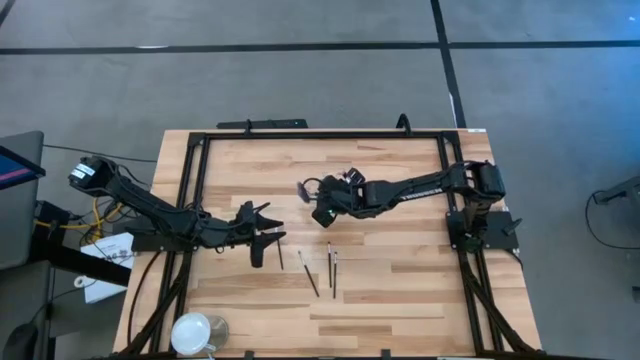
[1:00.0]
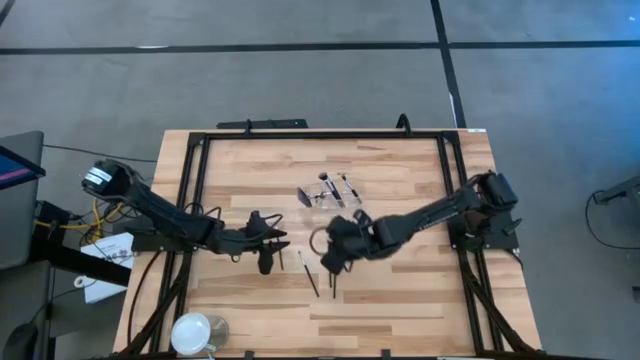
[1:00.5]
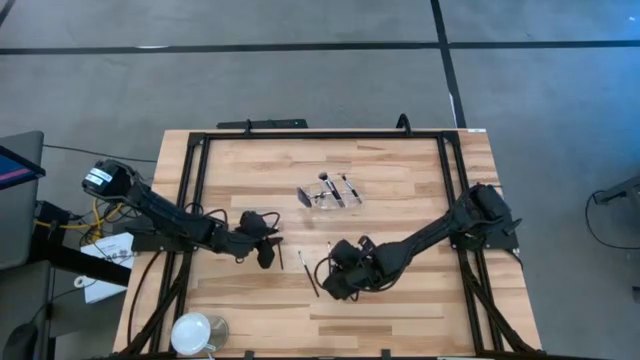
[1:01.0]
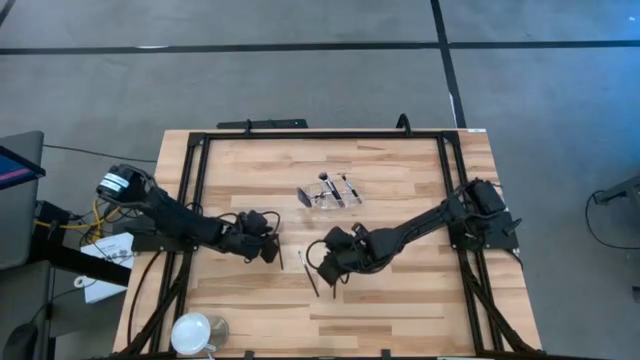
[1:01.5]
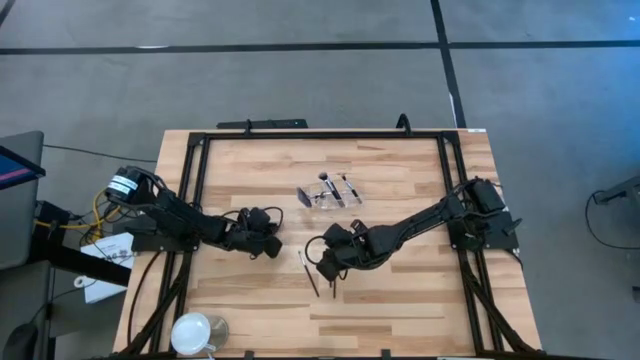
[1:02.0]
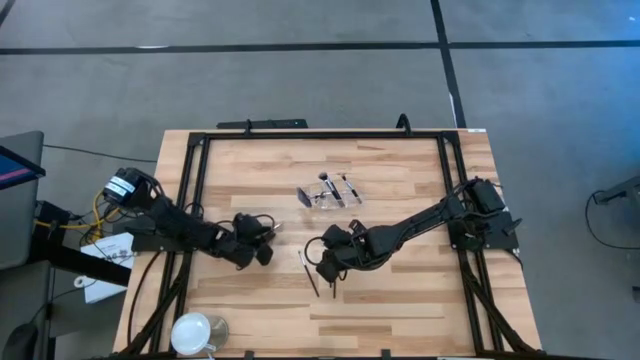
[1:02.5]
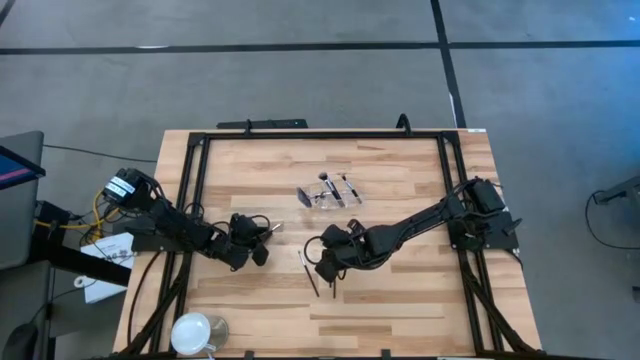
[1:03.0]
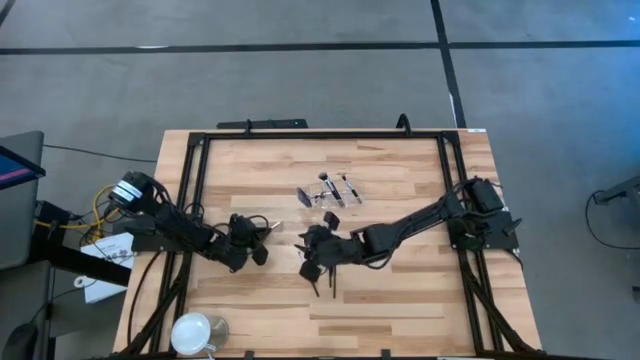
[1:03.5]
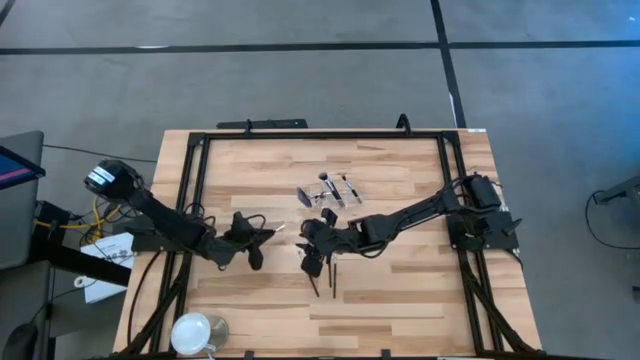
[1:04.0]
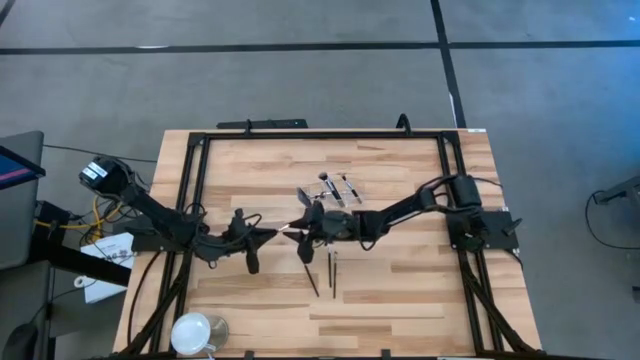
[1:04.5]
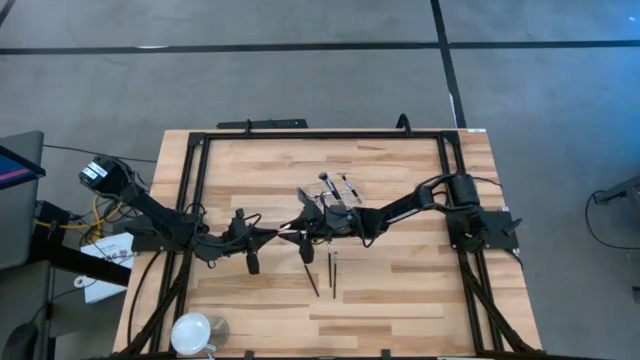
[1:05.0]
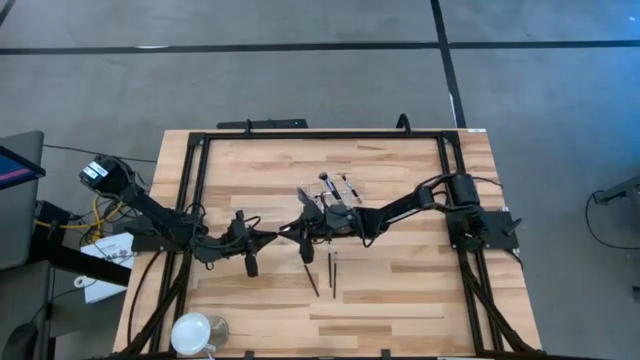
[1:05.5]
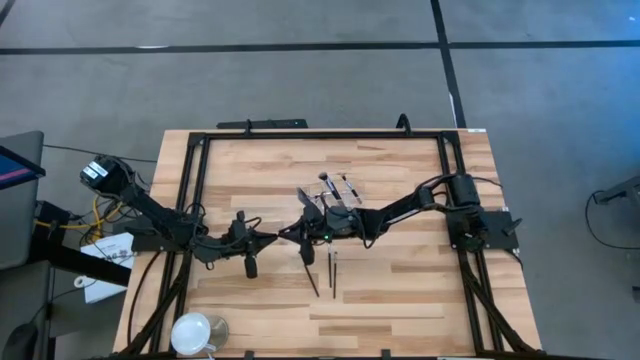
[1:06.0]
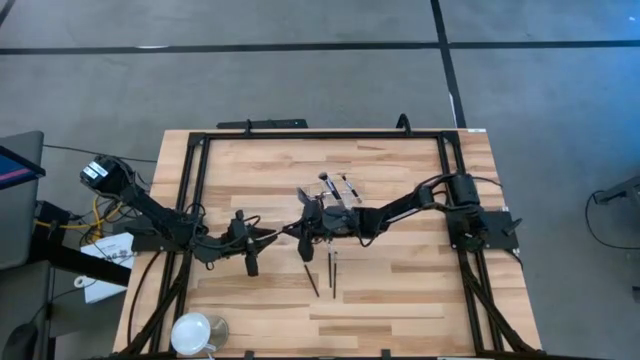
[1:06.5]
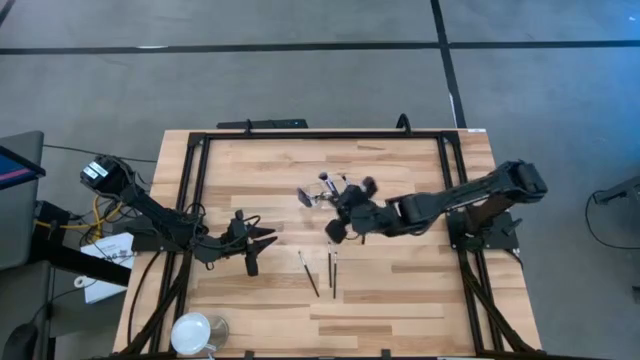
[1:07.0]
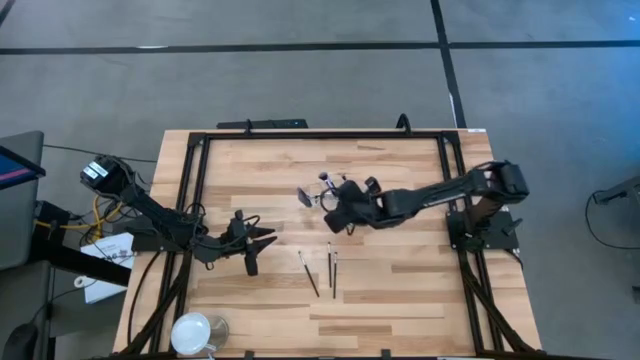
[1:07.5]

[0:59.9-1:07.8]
Task: Put items in baskets/containers
Put the eyeshadow brush into the middle section of the transparent organizer

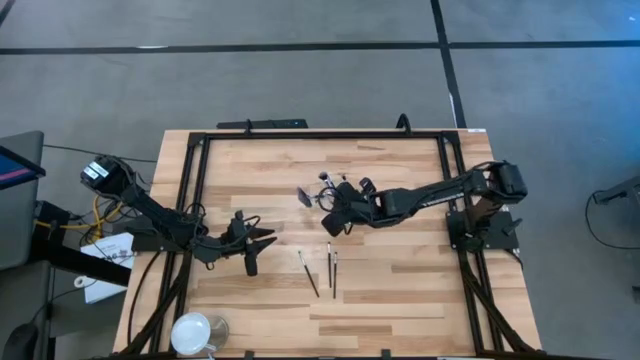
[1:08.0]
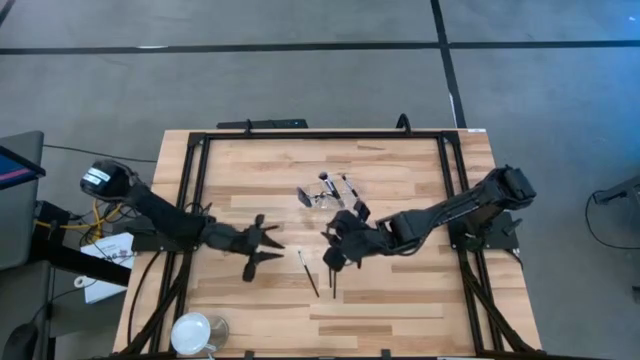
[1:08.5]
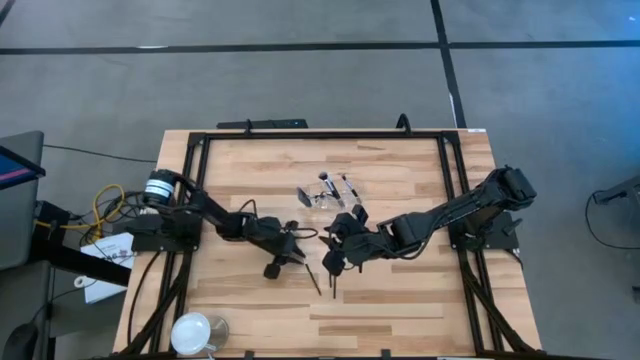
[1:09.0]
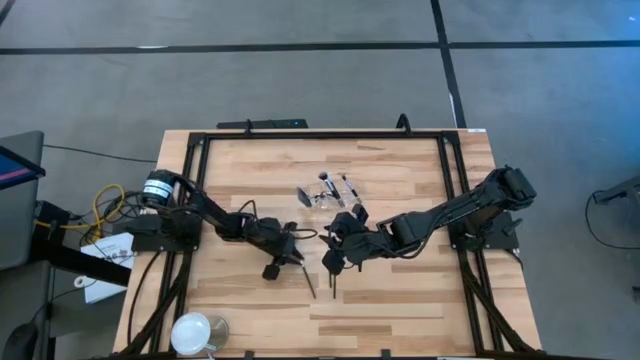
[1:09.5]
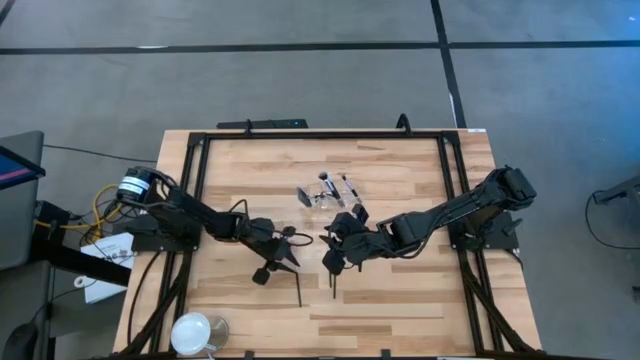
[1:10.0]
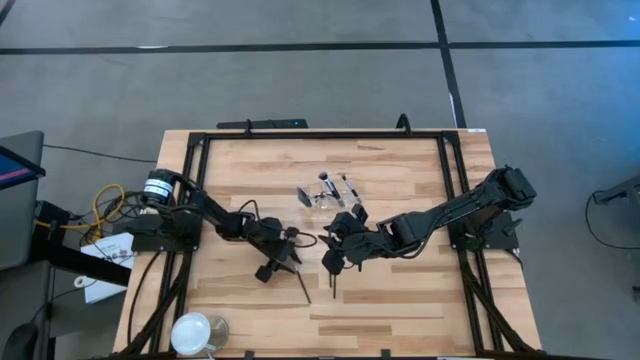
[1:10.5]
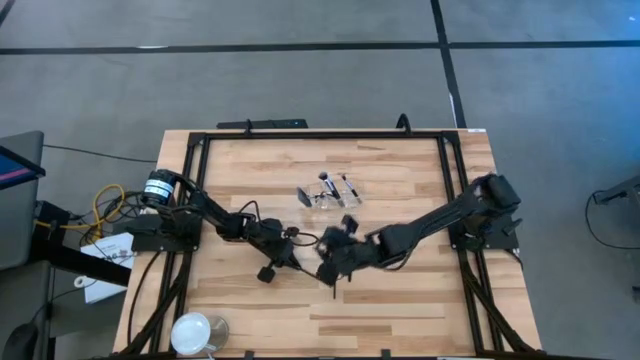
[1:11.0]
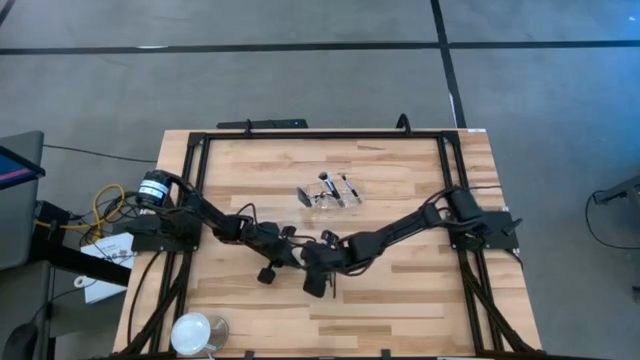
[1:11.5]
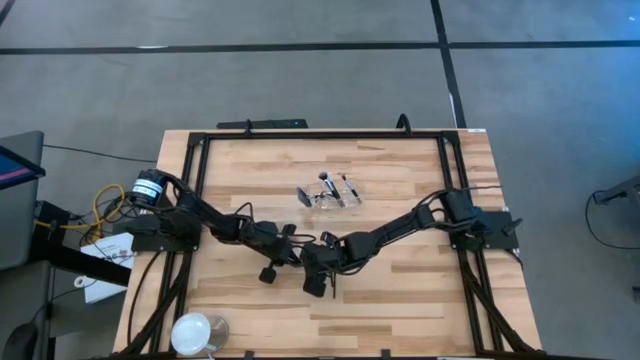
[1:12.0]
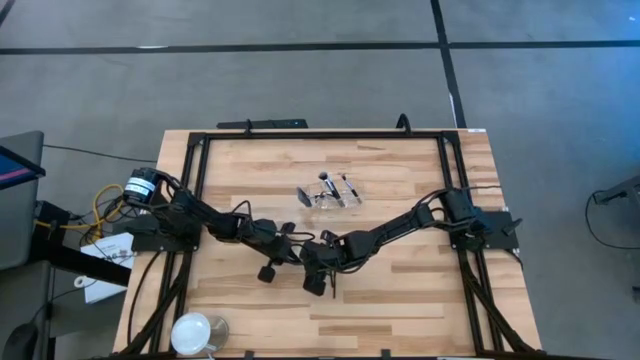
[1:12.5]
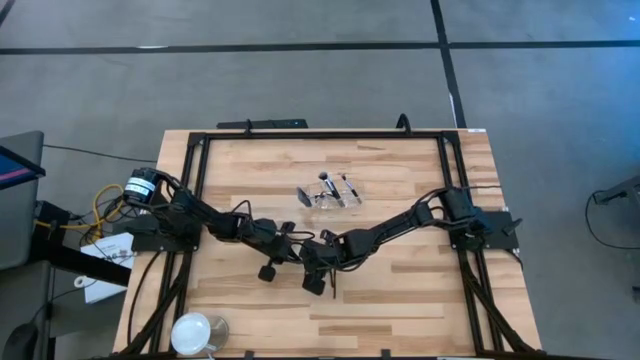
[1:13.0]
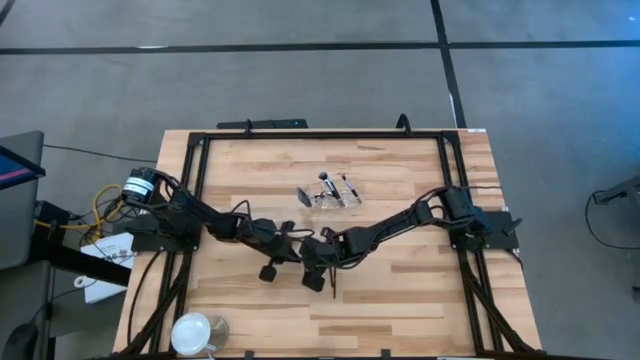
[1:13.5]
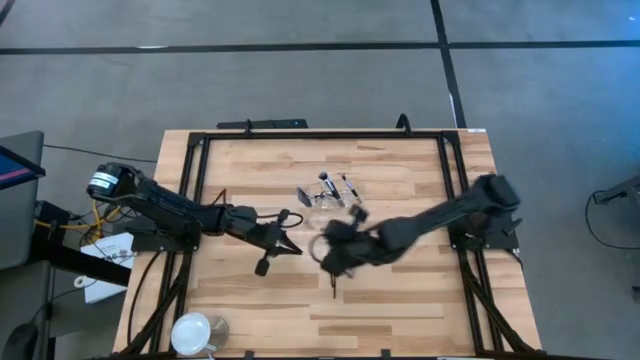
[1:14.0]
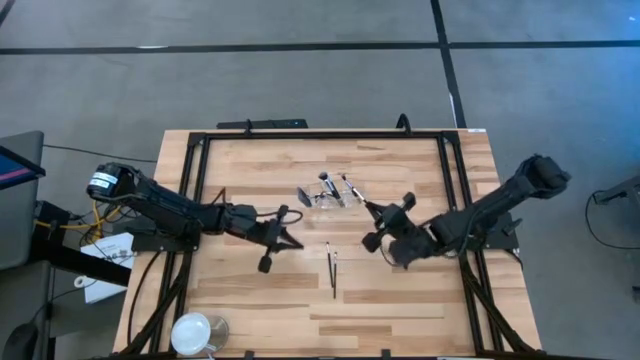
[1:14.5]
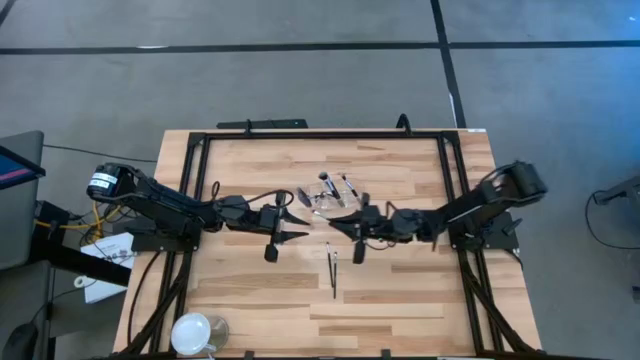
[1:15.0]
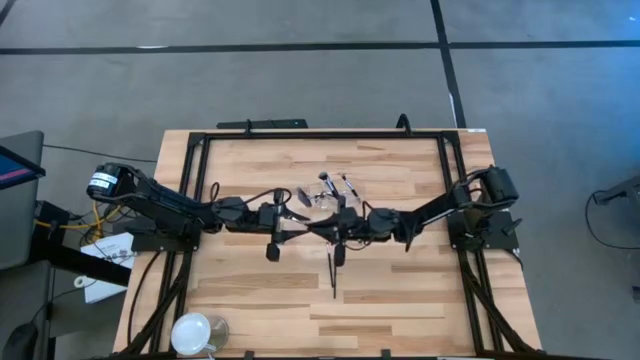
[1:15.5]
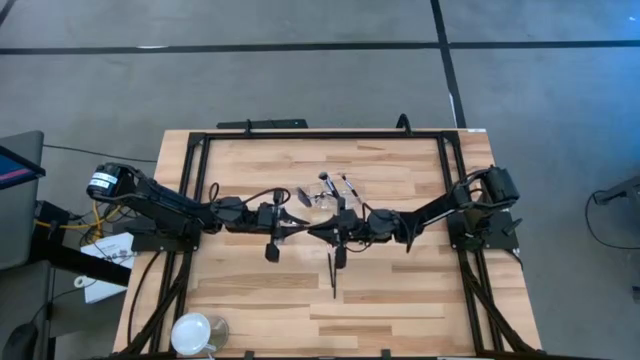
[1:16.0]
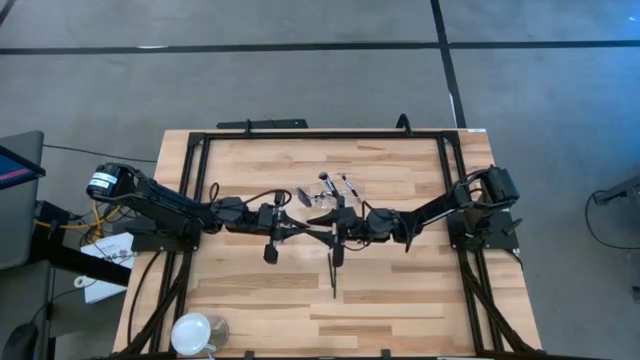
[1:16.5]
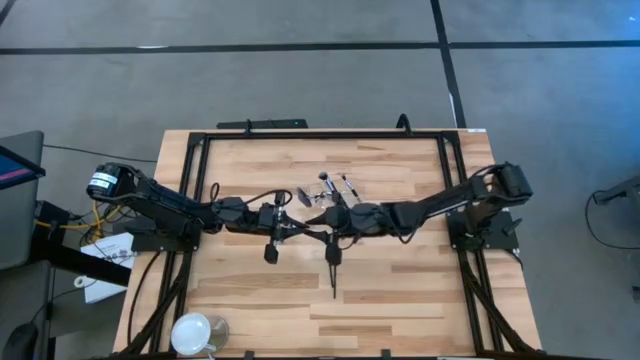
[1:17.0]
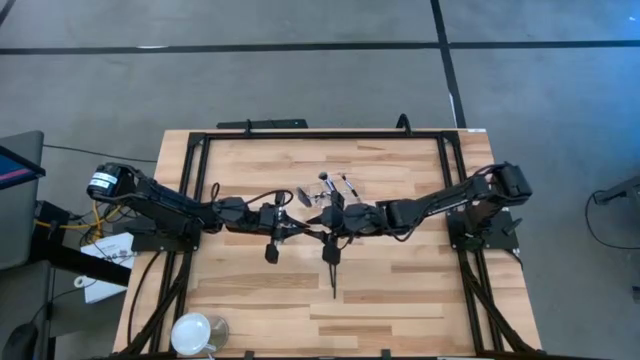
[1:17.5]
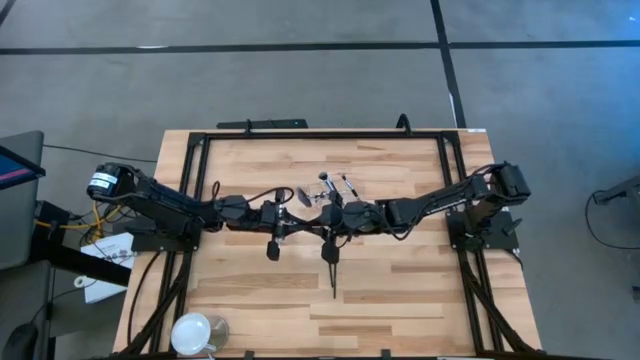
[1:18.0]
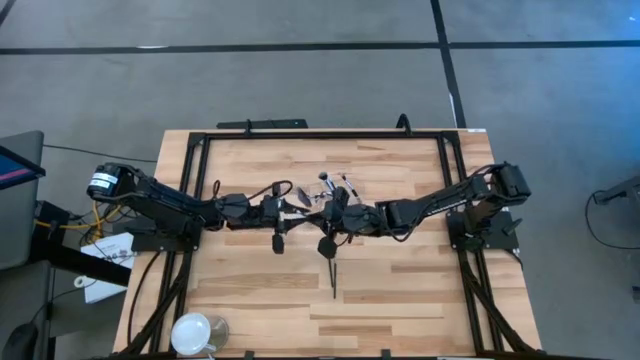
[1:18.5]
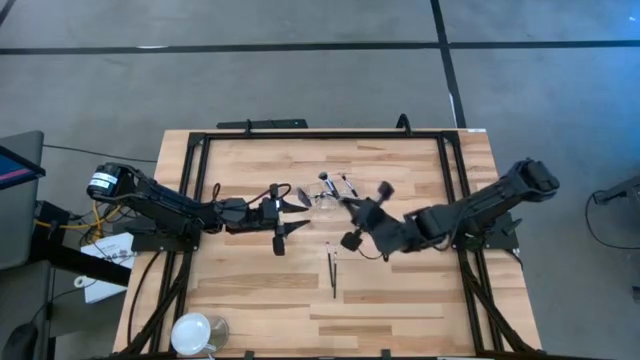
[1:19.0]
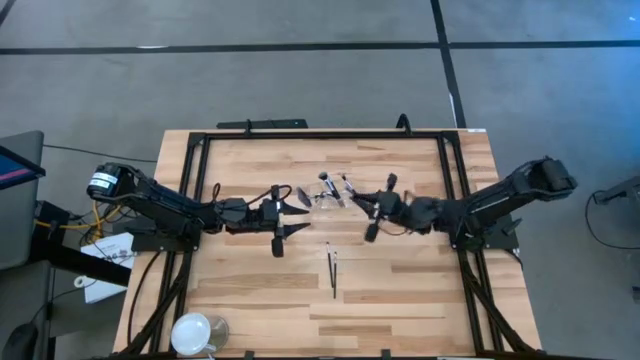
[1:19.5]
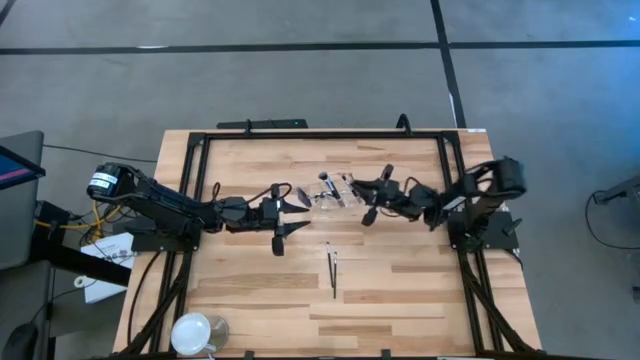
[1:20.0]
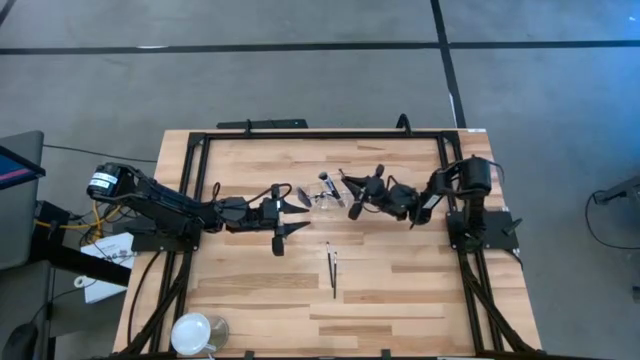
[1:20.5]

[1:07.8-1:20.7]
Put the eyeshadow brush into the right section of the transparent organizer

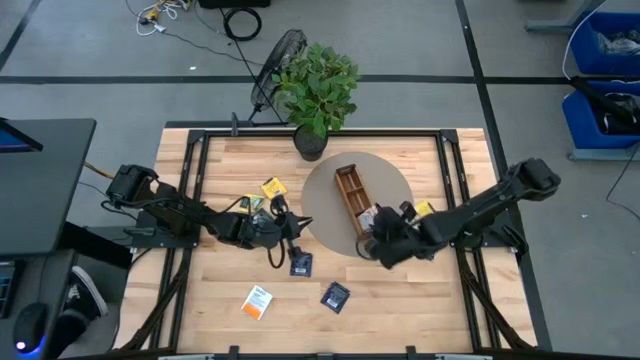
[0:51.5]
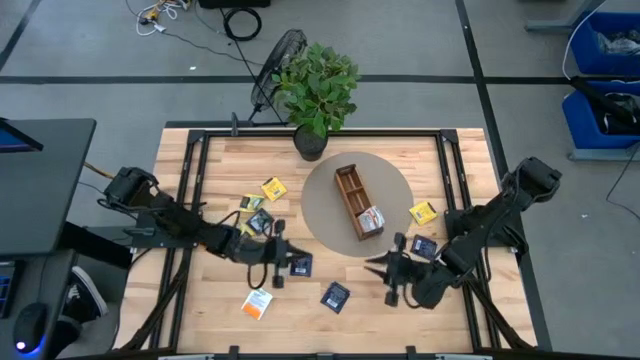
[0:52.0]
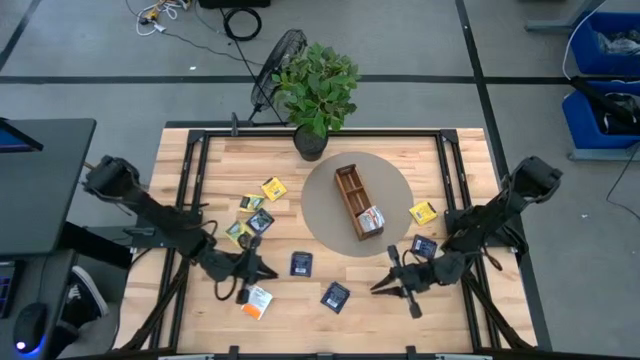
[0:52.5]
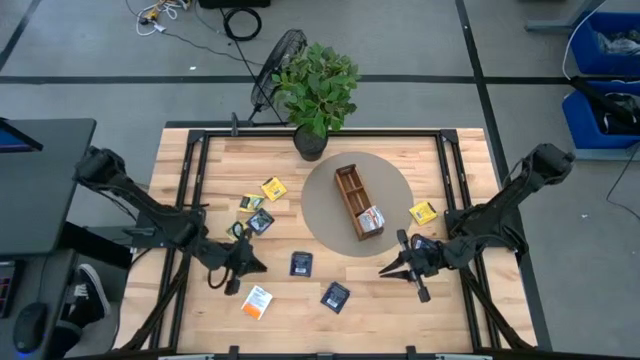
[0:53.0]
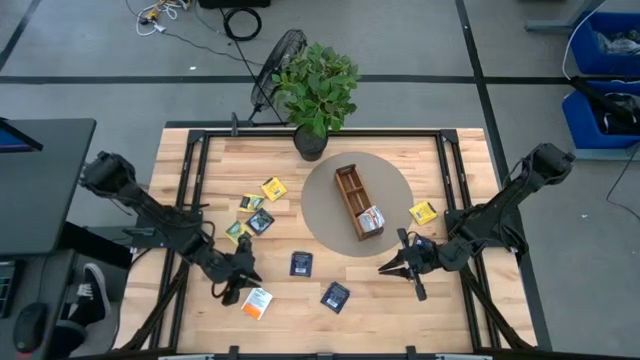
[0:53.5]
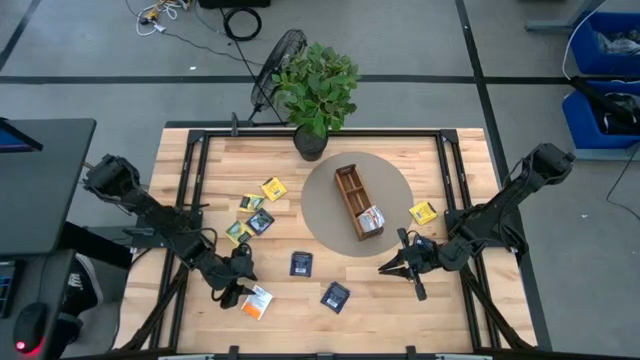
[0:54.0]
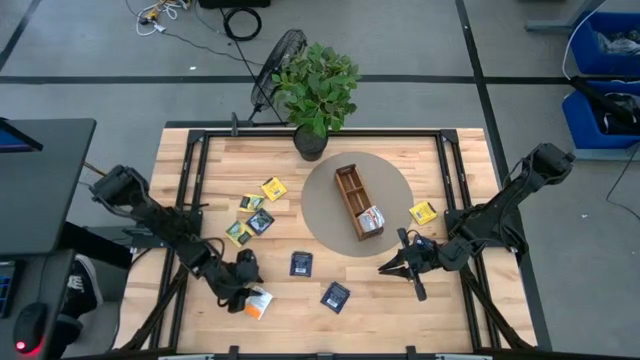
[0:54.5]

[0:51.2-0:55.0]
Task: Pick & Place Tea
Put the white tea bag into the bottom section of the wooden organizer
